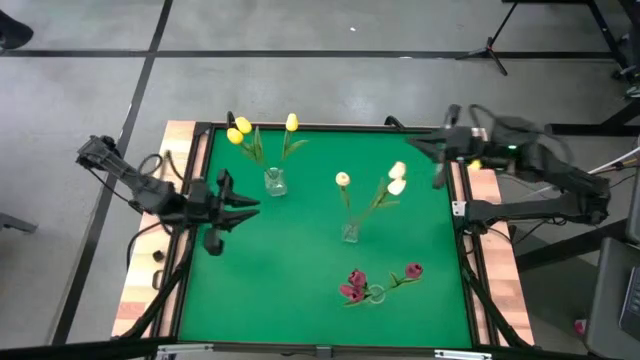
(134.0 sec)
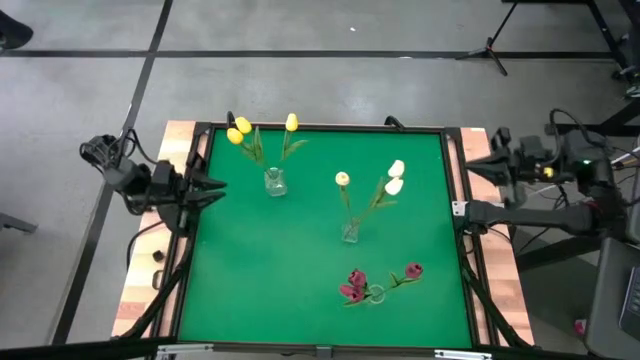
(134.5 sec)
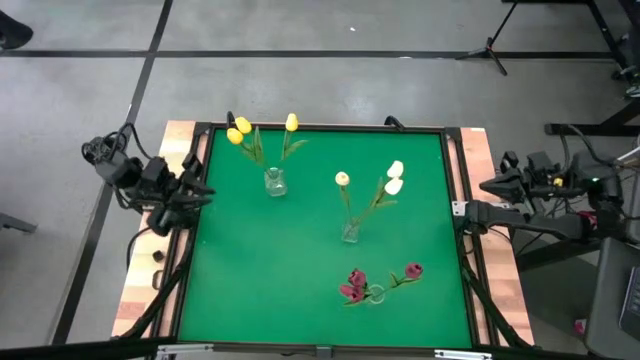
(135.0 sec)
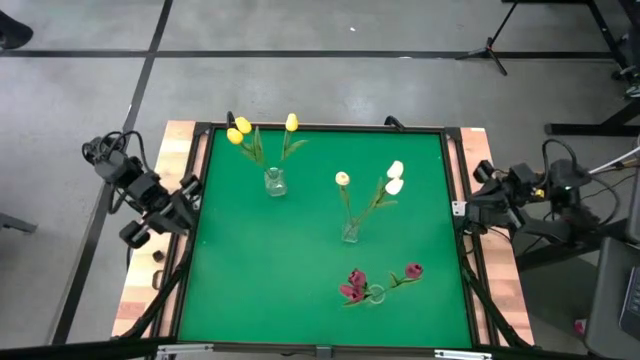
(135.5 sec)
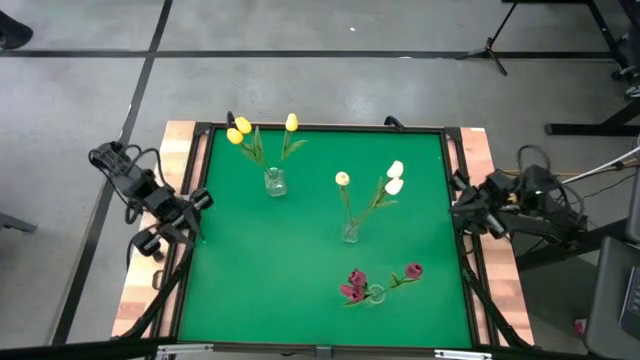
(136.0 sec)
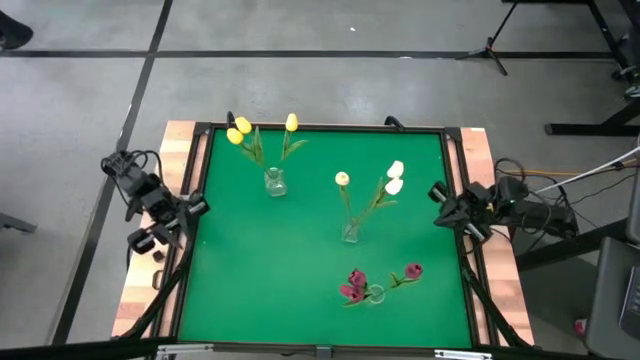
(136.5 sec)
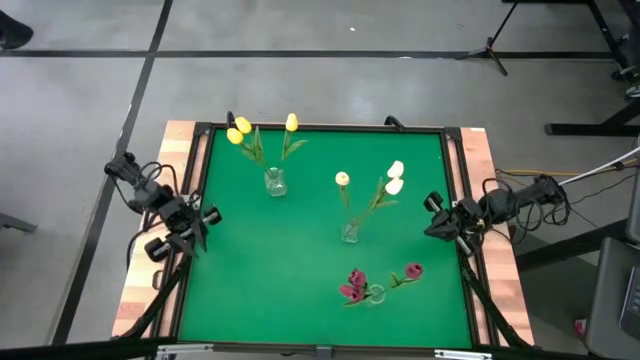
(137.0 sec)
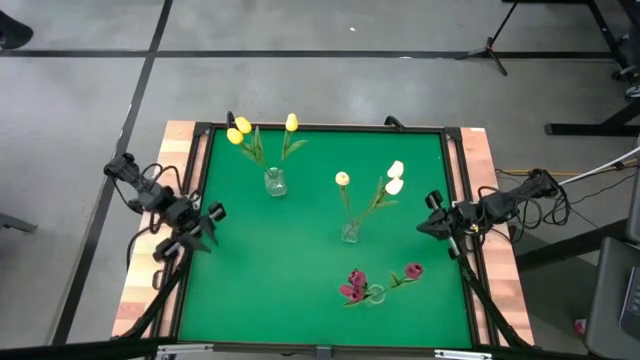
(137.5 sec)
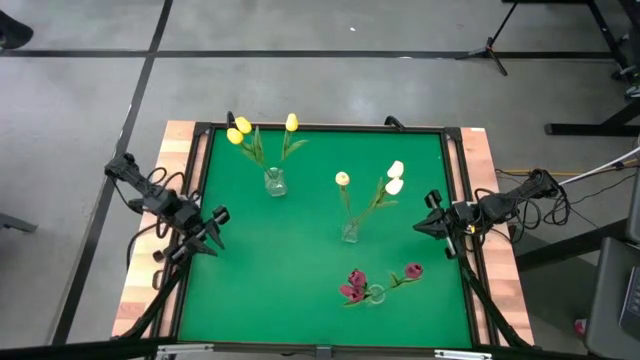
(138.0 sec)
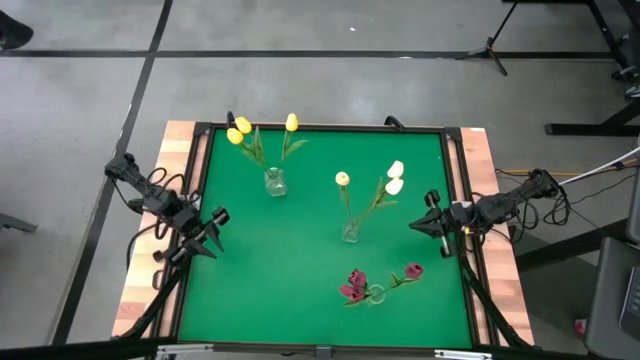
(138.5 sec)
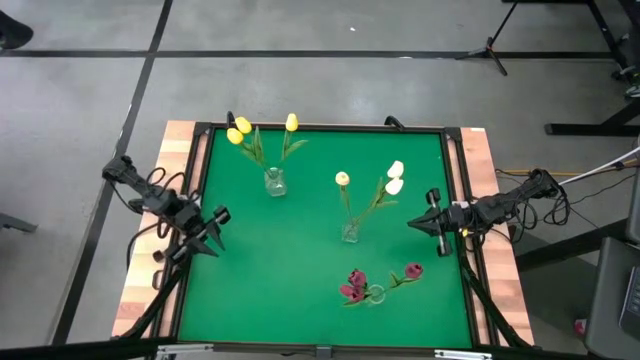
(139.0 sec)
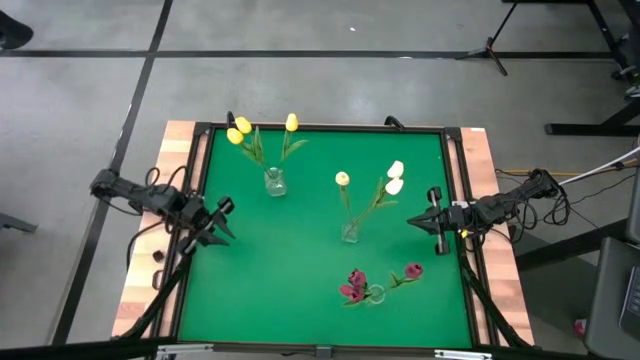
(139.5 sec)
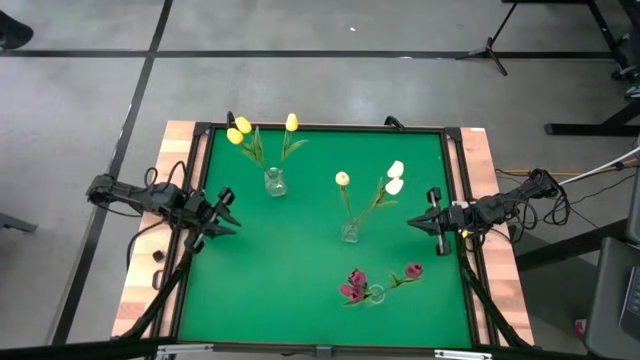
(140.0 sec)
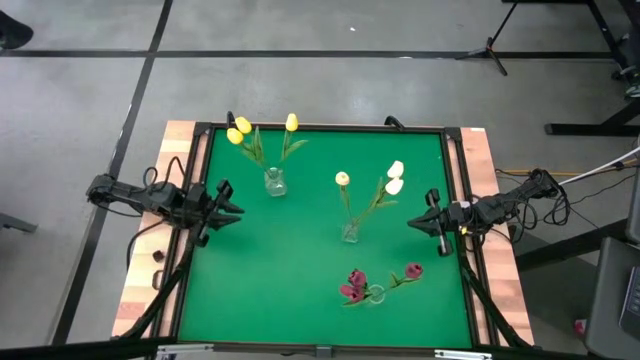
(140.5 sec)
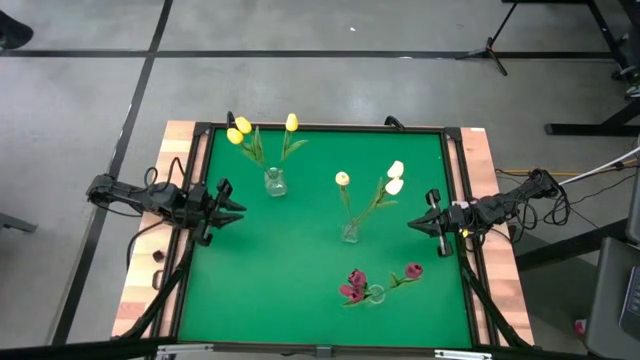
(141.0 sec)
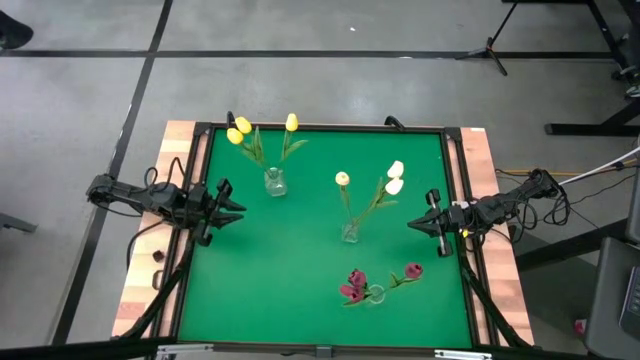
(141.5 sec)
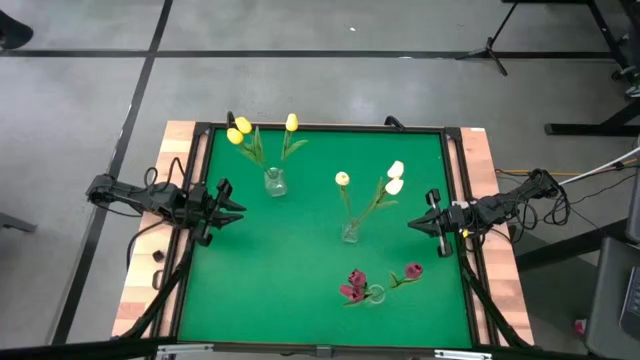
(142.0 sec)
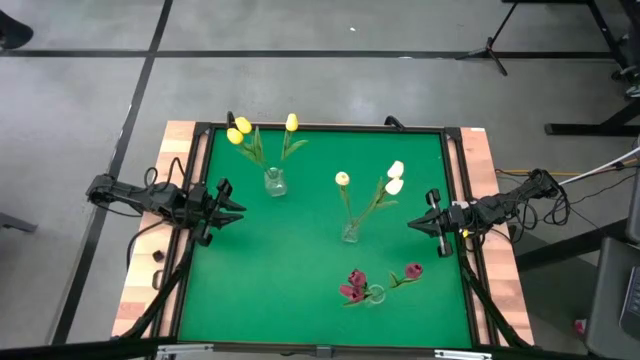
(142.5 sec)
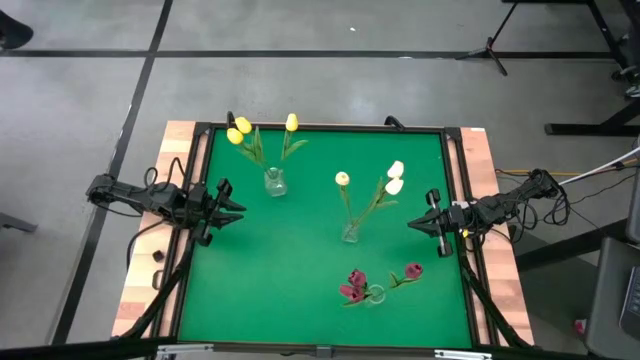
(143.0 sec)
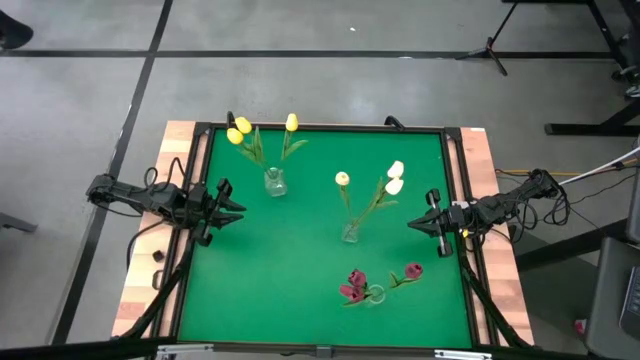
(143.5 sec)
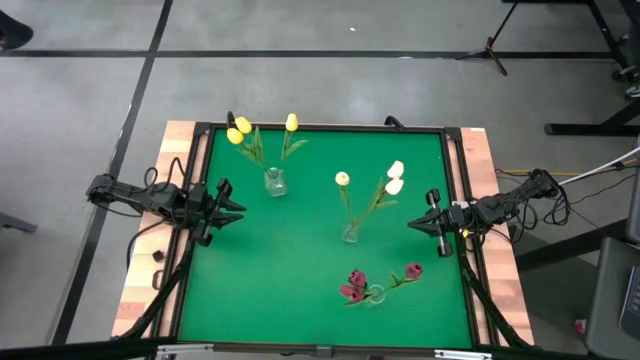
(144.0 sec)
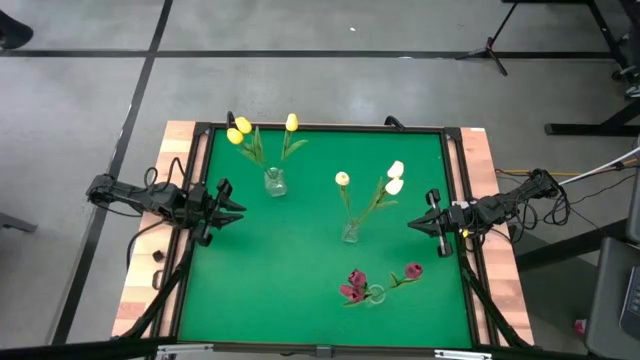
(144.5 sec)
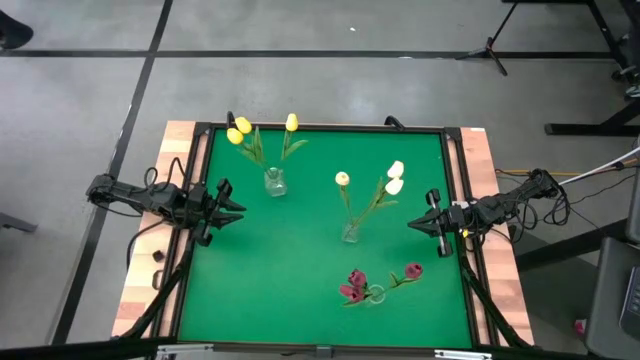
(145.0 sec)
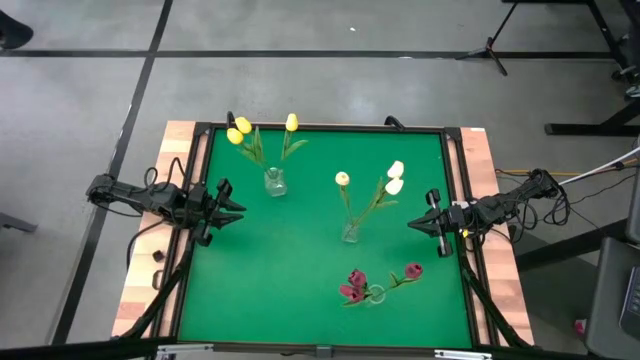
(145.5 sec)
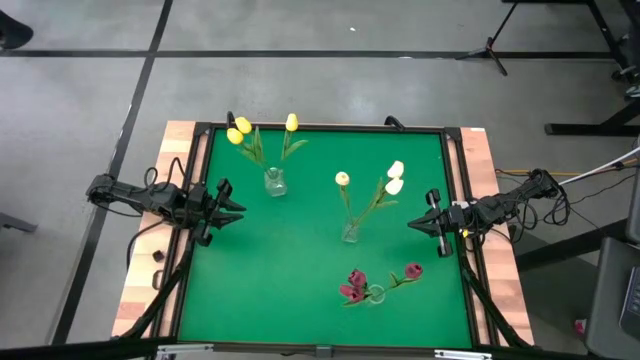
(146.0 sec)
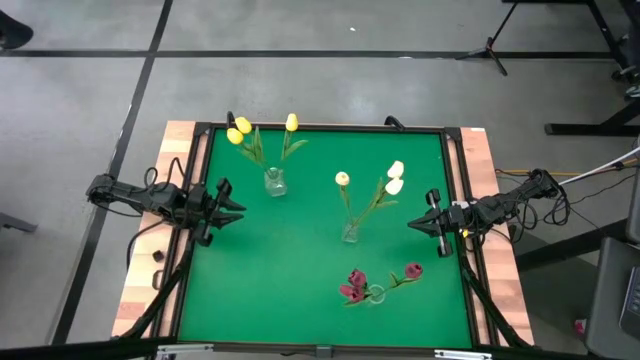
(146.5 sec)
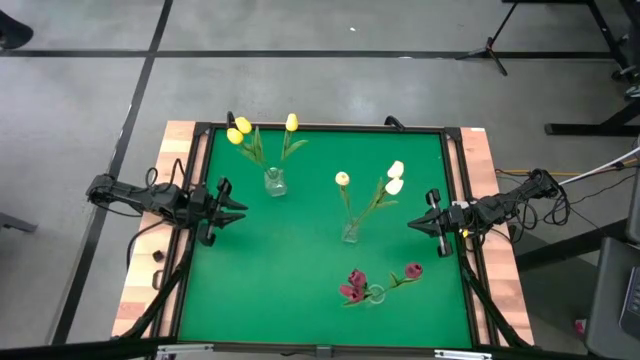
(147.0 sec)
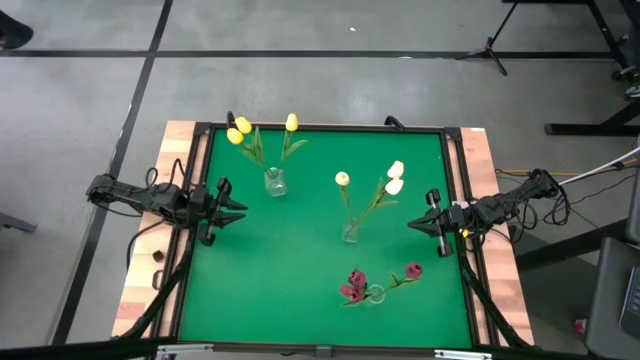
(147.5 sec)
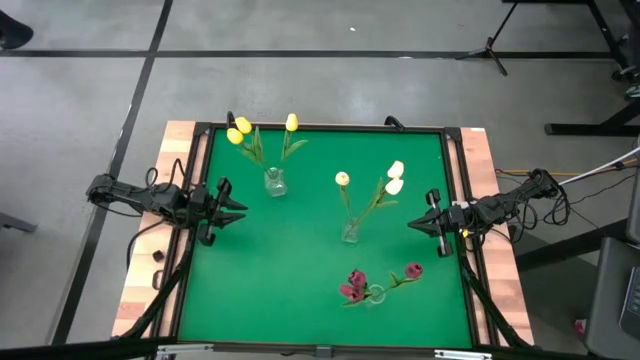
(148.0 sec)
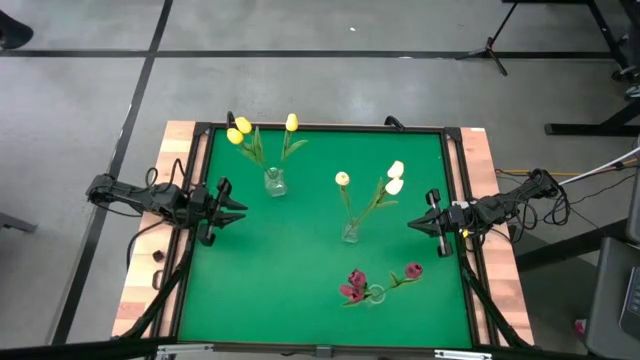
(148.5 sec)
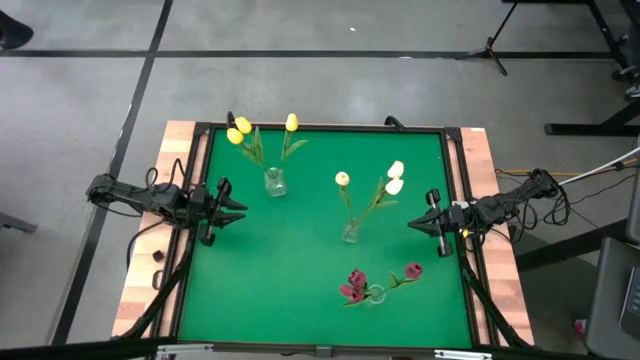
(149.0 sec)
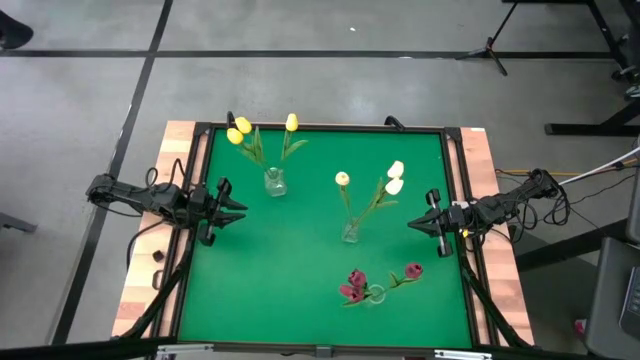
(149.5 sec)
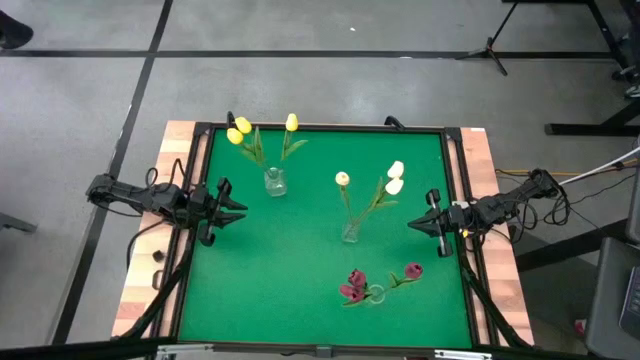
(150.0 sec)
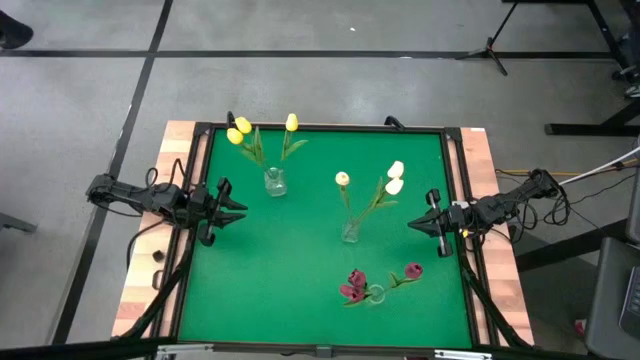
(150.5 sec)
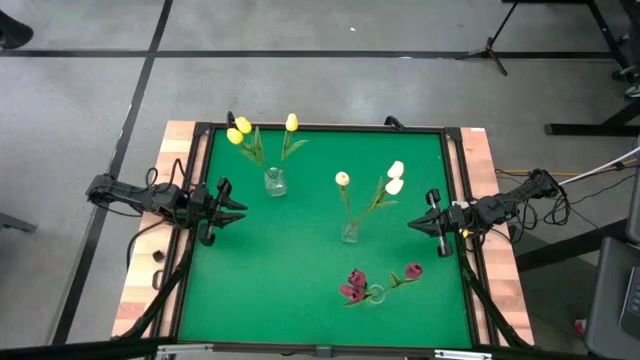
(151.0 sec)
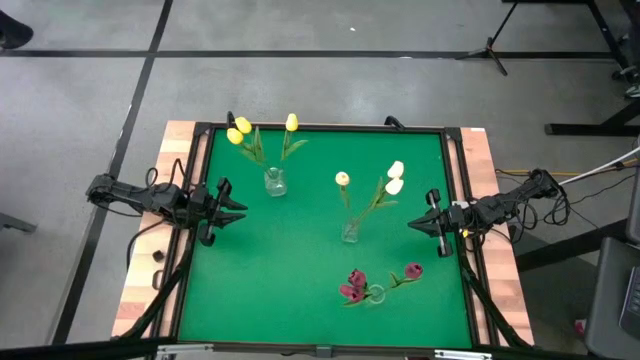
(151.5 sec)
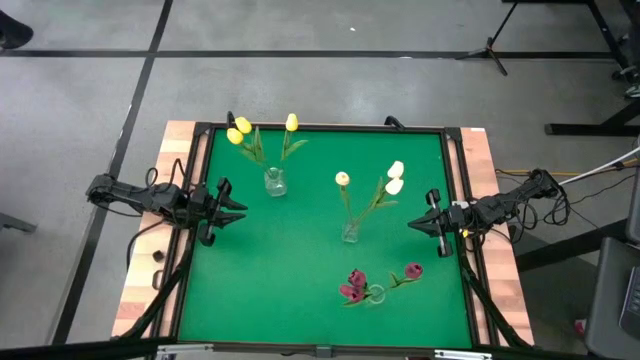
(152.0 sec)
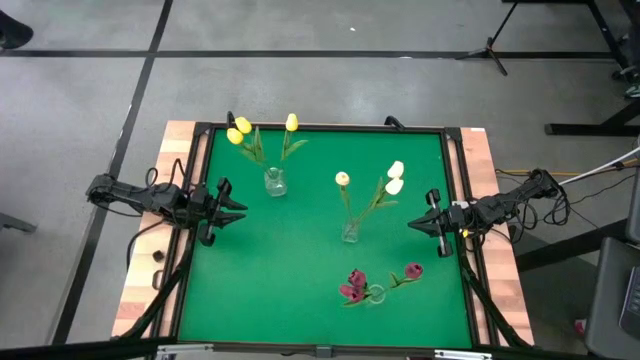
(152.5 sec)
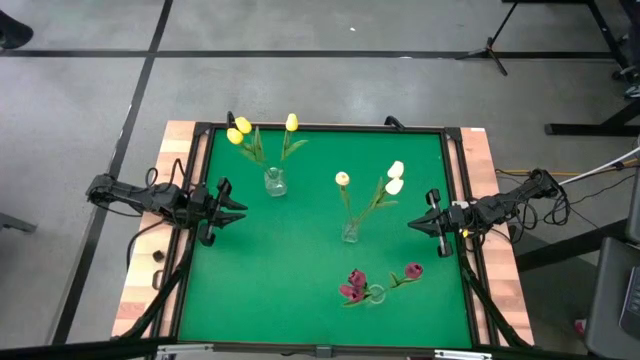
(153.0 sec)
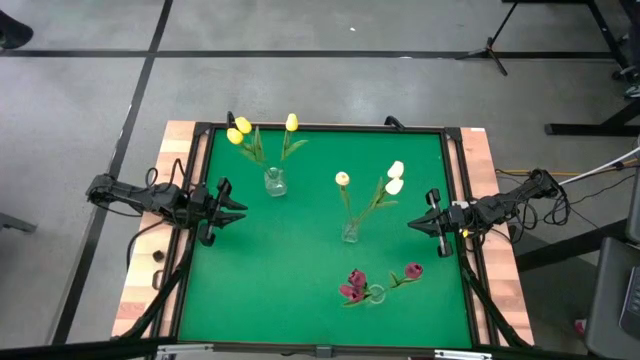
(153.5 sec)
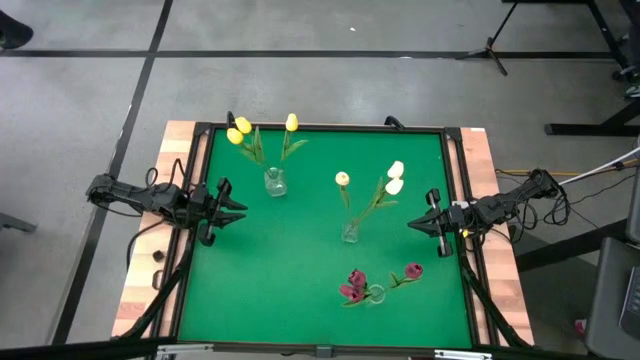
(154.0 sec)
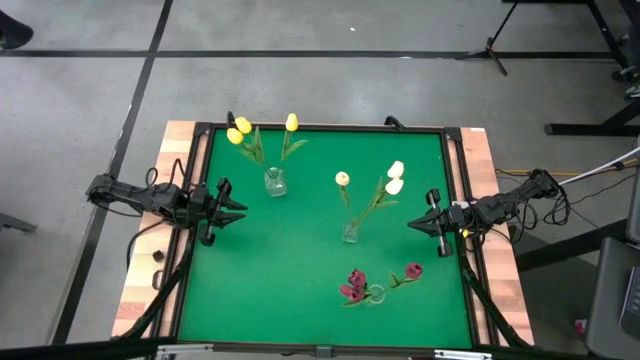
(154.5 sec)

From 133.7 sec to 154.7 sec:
Task: Sort flowers into vase by color
Return to Home Position
